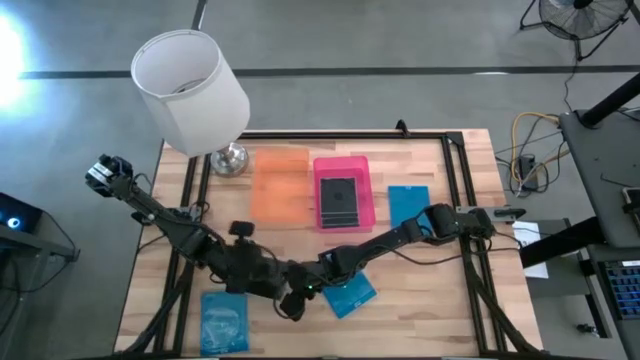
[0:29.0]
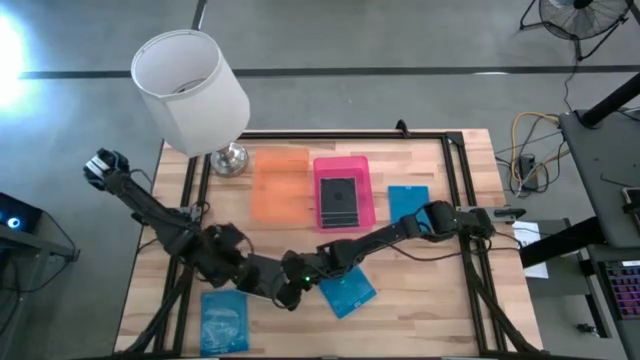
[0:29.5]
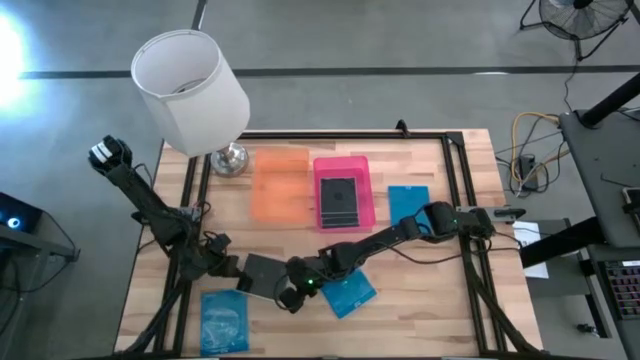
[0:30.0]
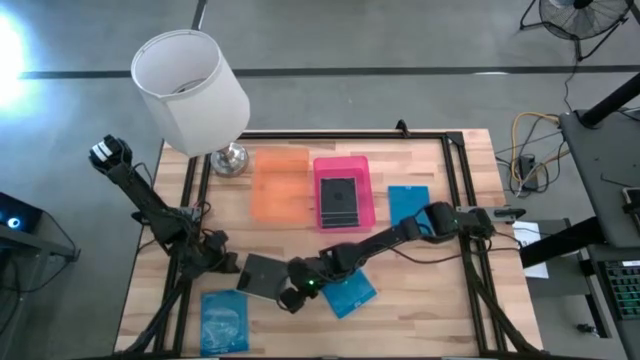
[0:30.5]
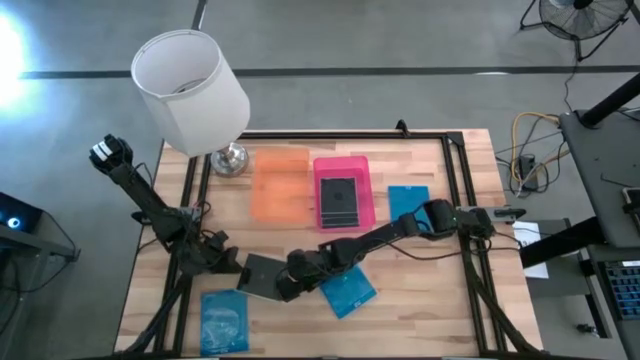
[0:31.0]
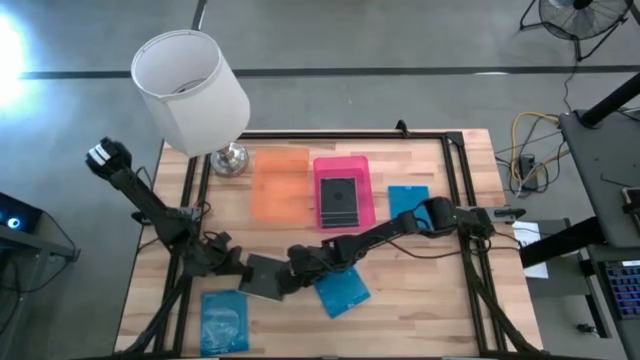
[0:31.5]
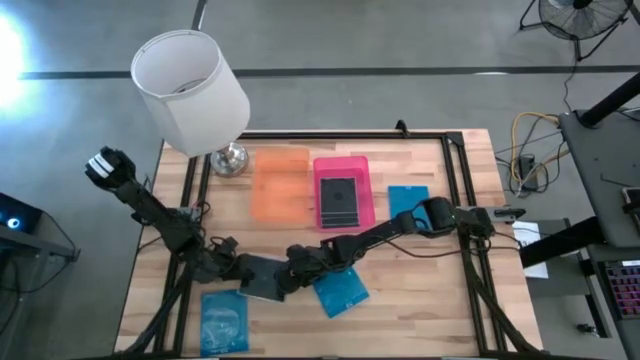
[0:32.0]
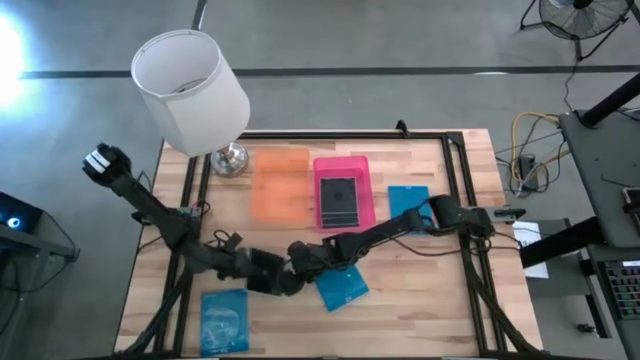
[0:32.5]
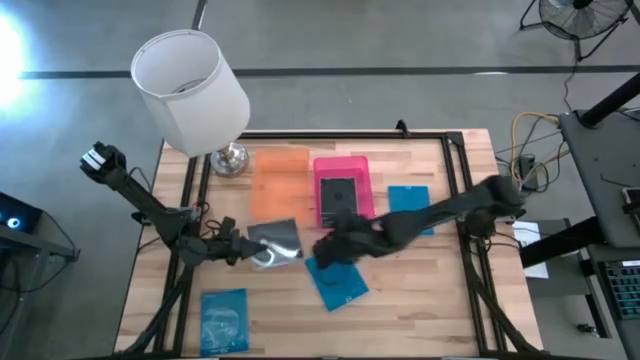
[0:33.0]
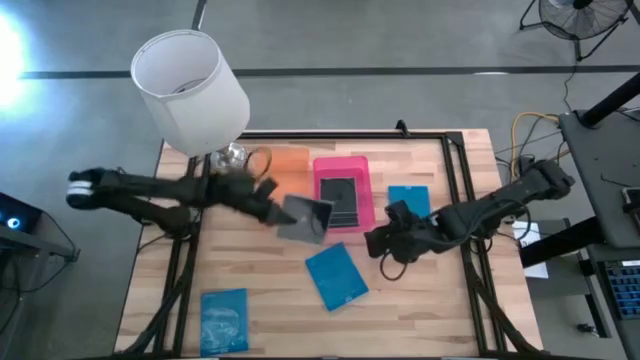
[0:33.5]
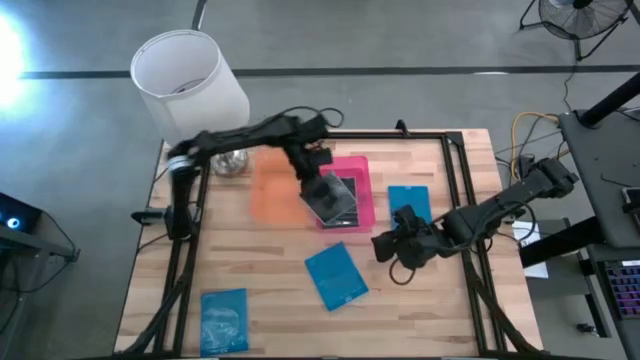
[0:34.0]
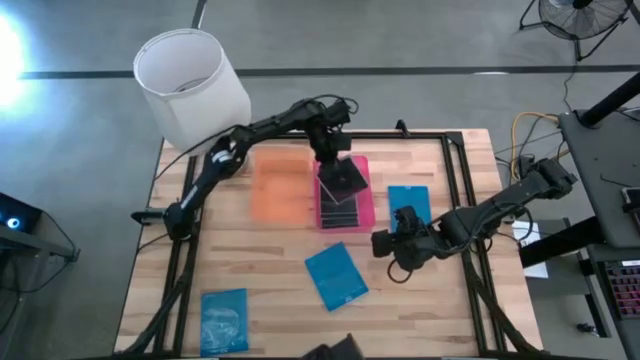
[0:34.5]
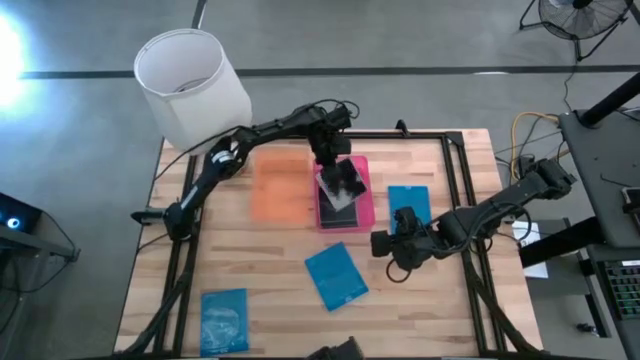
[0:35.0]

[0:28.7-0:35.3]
Task: Pick & place jewel cases by type
Put the black CD case into the pink bin

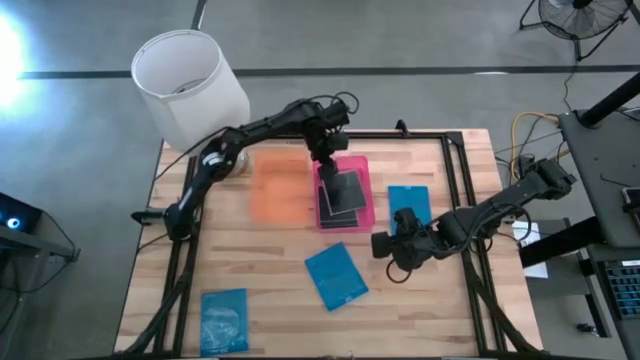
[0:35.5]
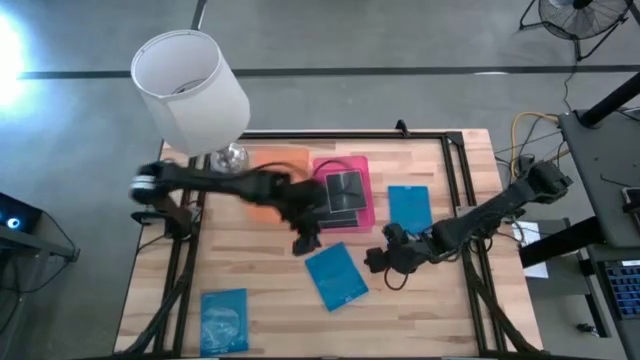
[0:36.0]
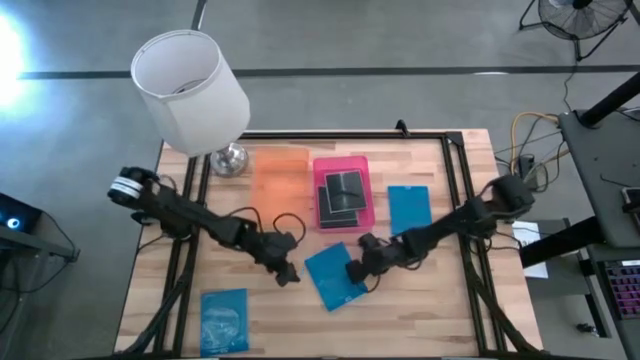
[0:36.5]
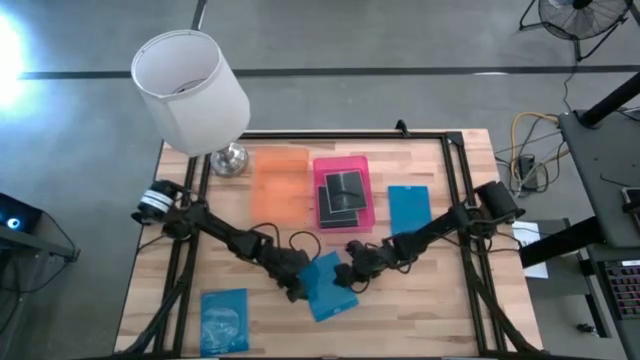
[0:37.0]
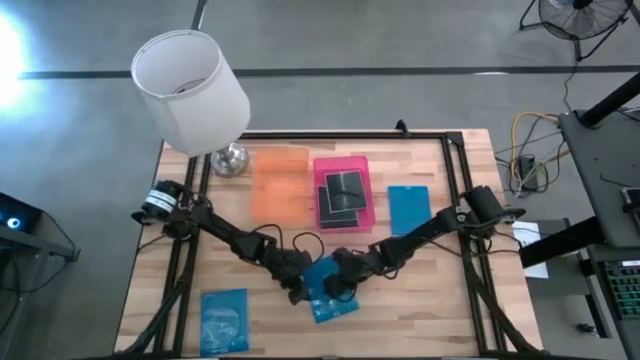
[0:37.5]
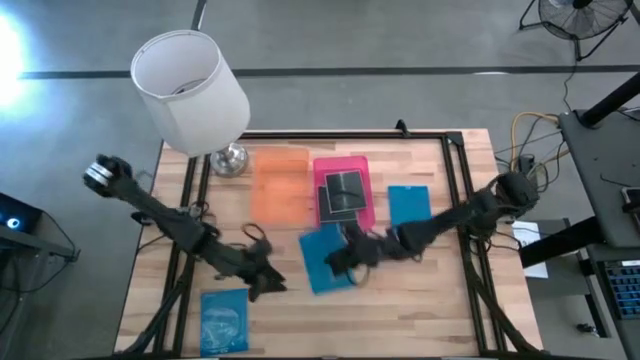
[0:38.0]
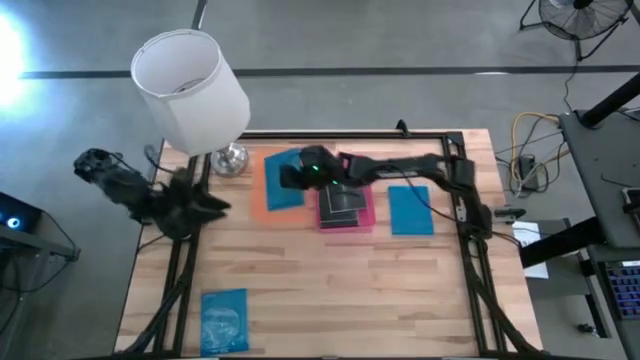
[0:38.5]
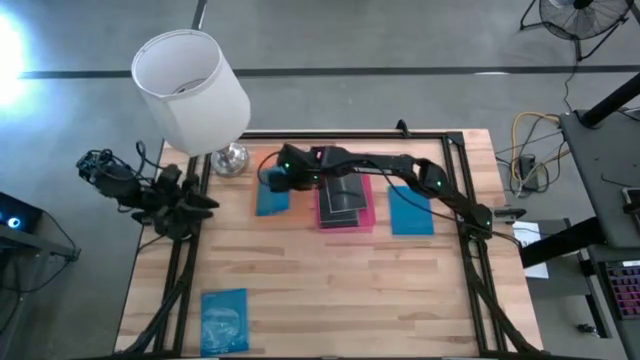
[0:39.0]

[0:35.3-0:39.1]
Put the middle blue CD case into the orange bin

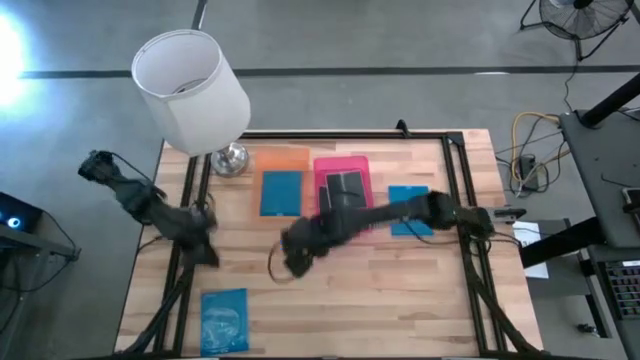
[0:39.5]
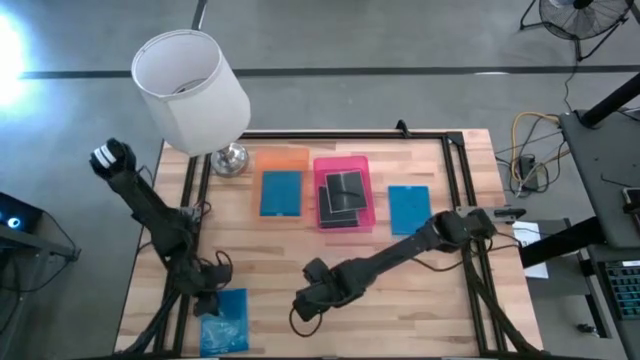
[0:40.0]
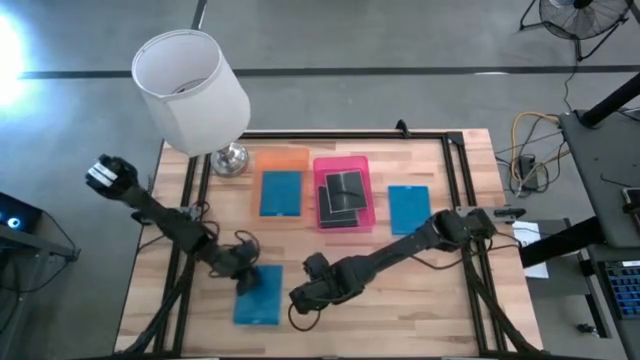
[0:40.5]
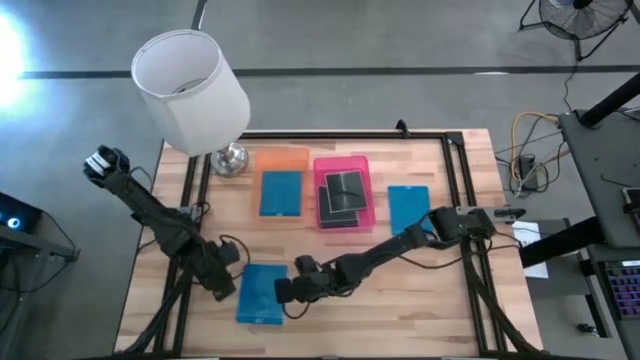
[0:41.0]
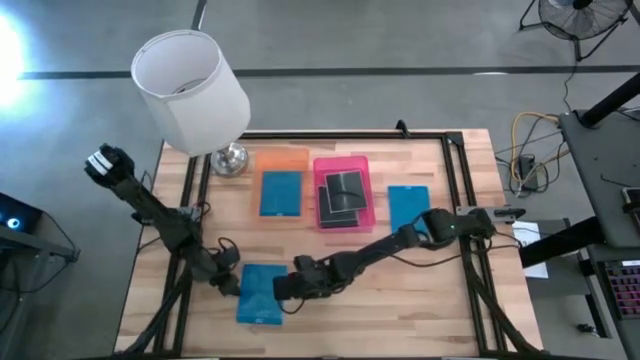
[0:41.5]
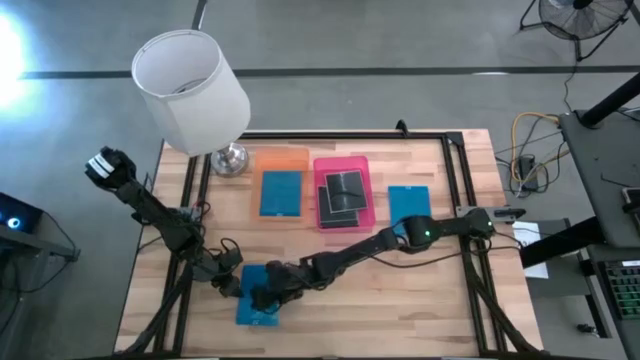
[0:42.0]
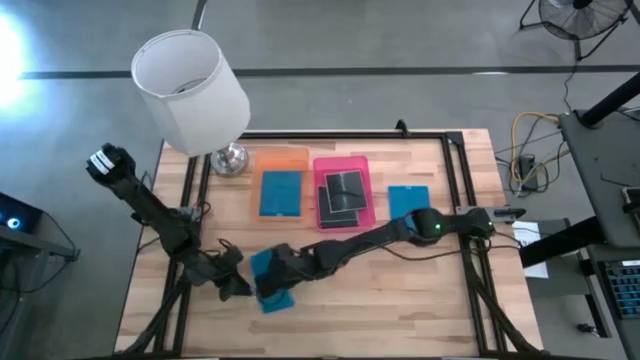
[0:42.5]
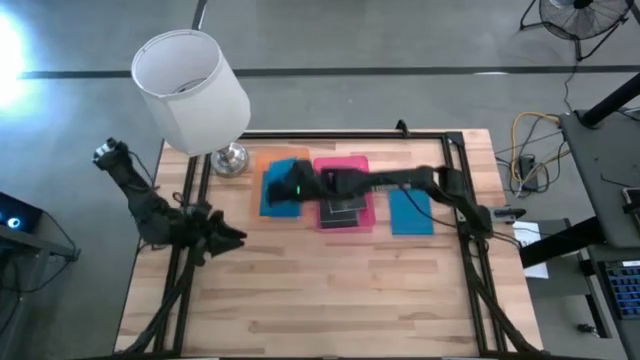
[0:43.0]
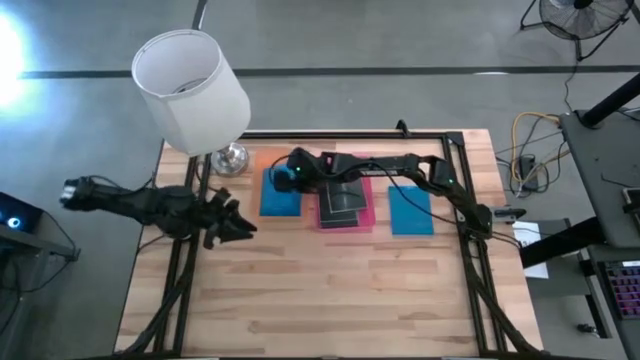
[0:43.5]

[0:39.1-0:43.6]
Put the left blue CD case into the orange bin

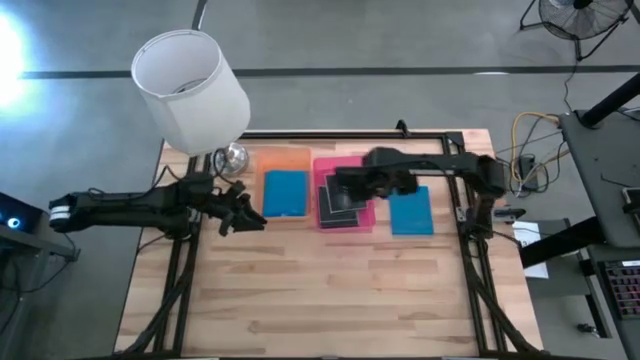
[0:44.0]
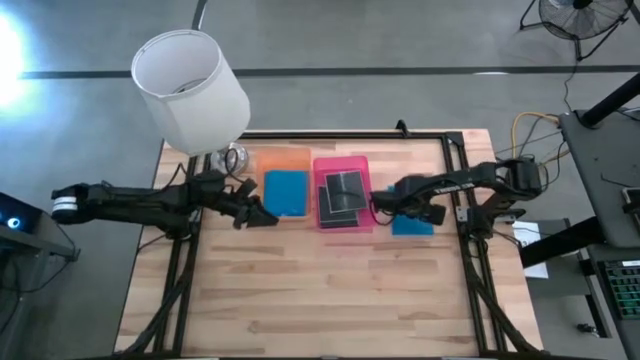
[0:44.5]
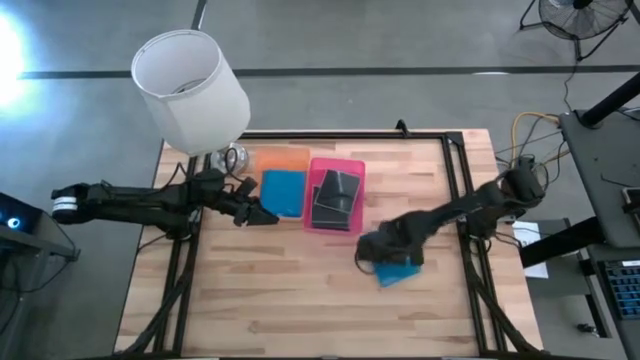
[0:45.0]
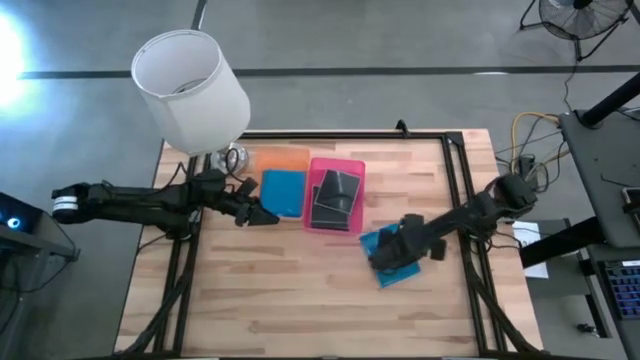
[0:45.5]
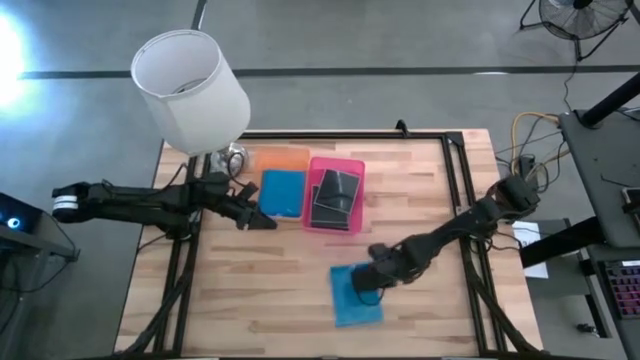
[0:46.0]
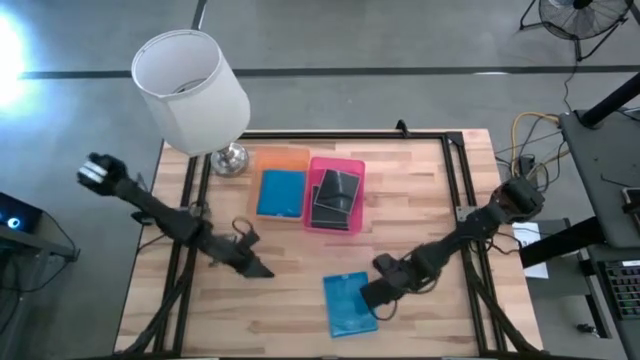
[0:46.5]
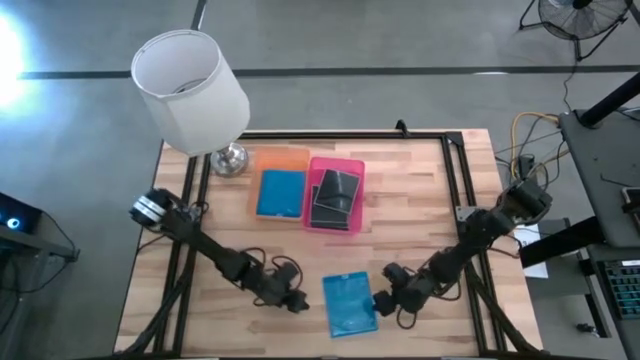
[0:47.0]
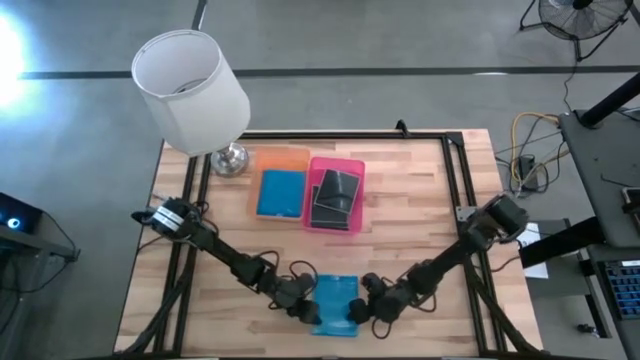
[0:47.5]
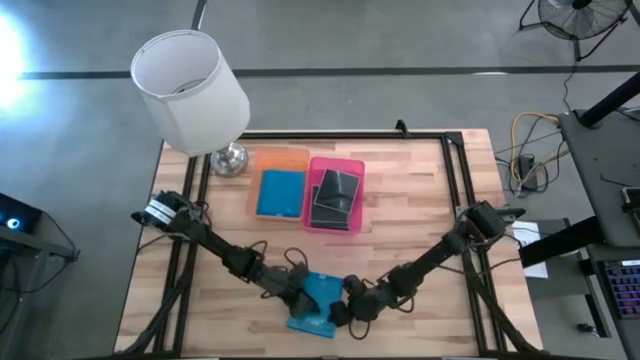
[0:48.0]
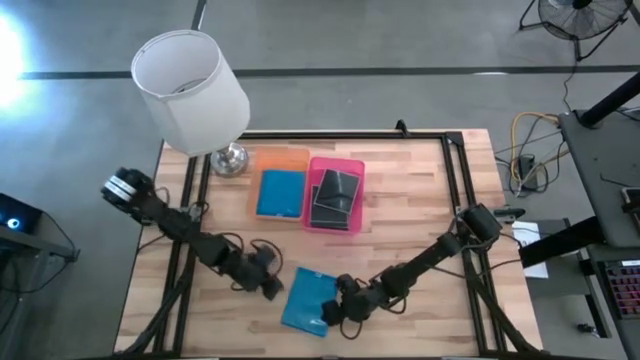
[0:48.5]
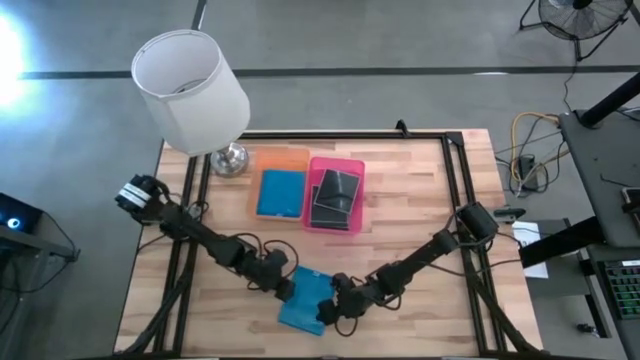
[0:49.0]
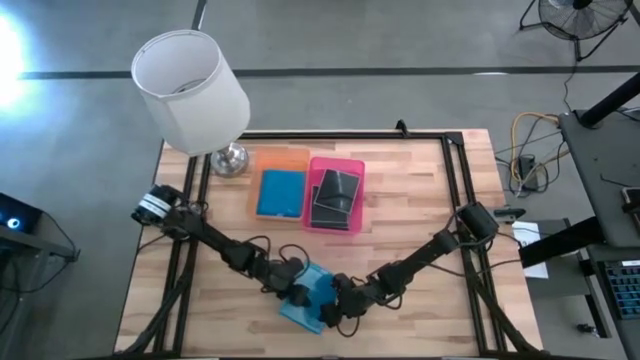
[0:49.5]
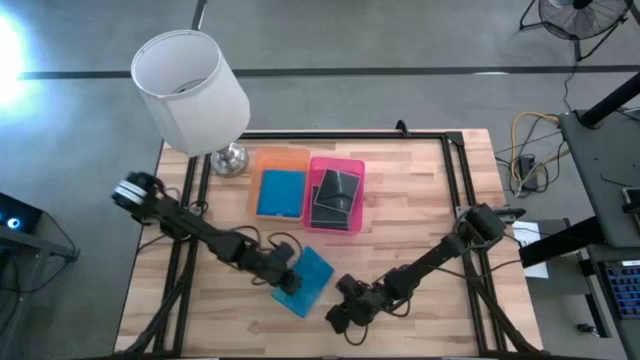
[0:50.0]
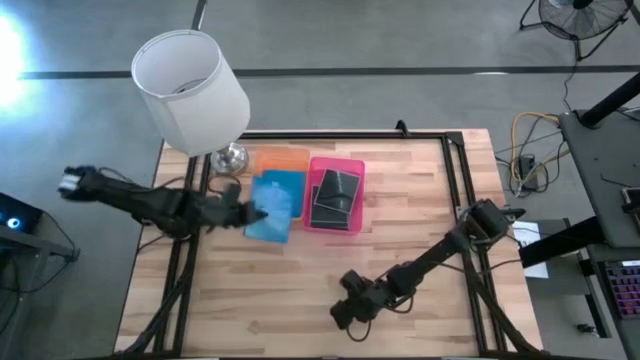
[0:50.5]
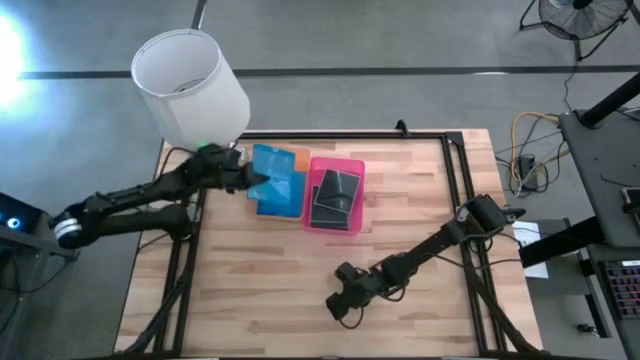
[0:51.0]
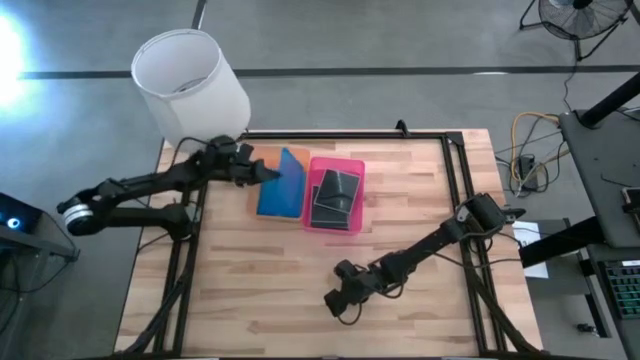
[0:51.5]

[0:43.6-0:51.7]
Put the blue CD case into the orange bin
